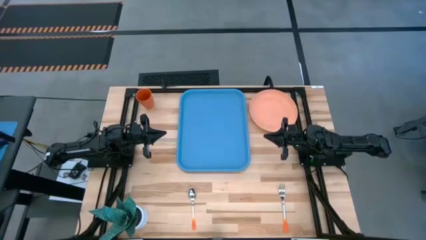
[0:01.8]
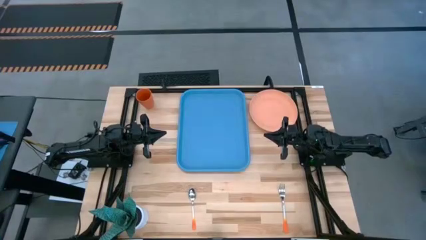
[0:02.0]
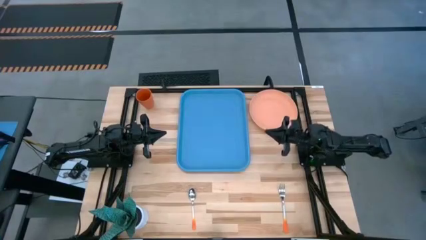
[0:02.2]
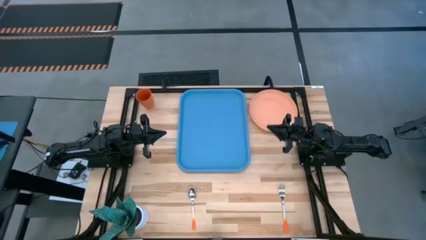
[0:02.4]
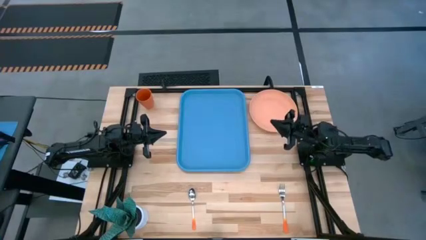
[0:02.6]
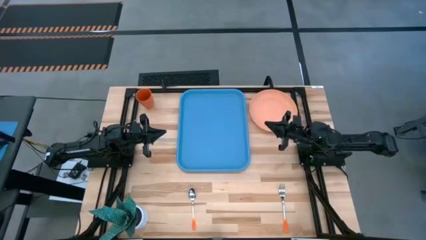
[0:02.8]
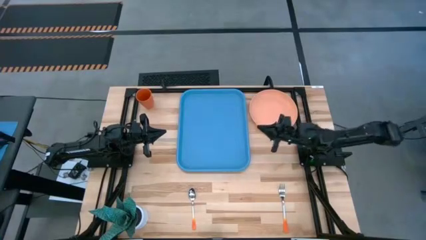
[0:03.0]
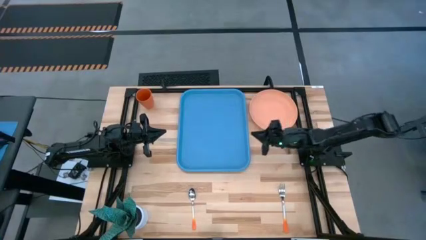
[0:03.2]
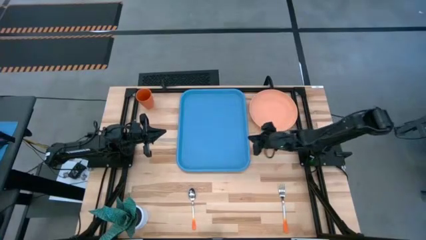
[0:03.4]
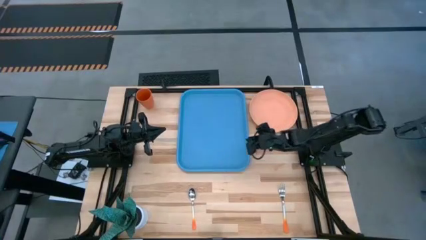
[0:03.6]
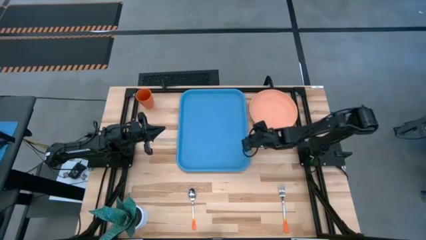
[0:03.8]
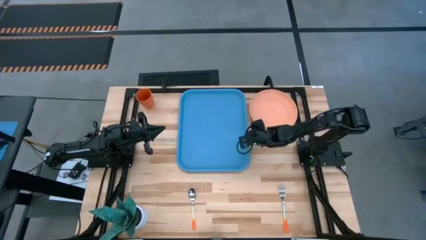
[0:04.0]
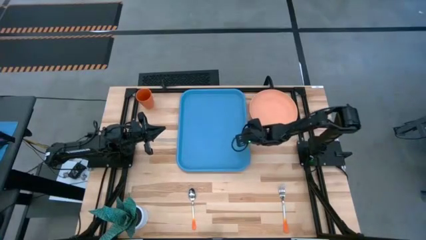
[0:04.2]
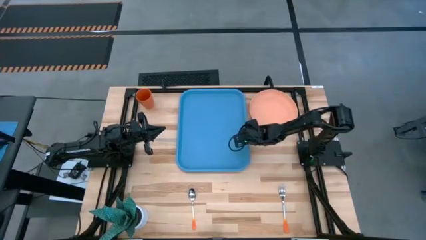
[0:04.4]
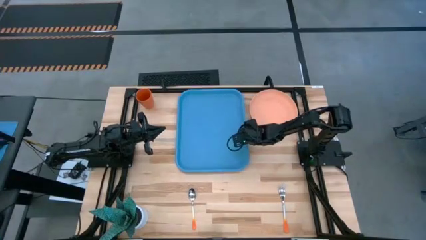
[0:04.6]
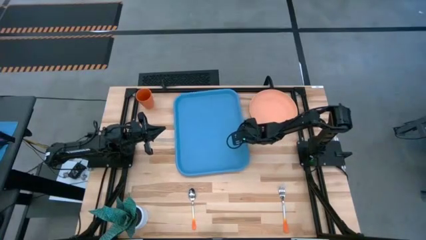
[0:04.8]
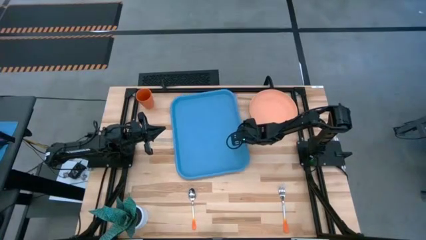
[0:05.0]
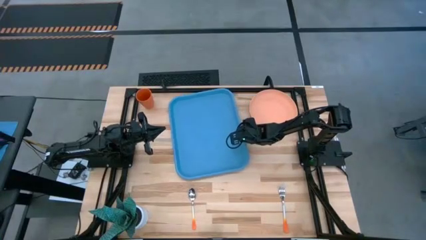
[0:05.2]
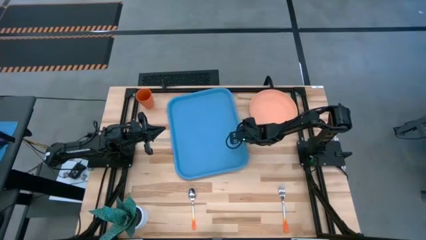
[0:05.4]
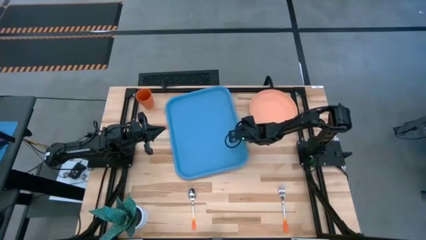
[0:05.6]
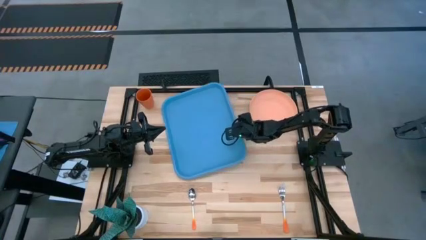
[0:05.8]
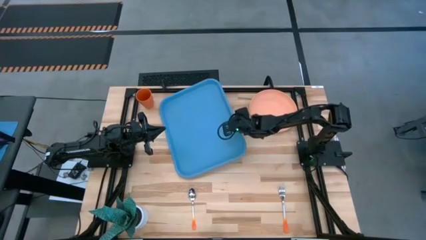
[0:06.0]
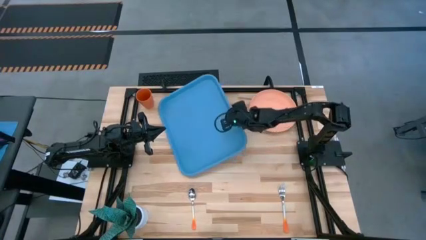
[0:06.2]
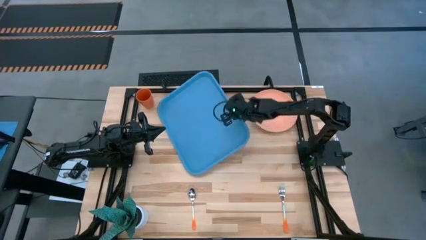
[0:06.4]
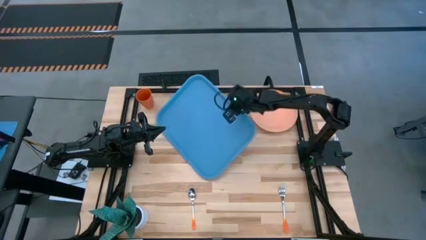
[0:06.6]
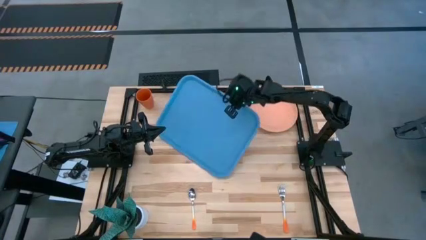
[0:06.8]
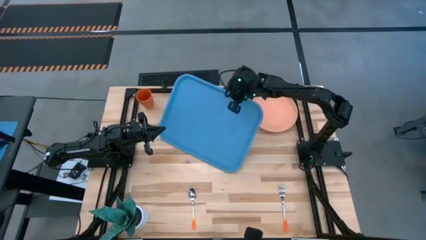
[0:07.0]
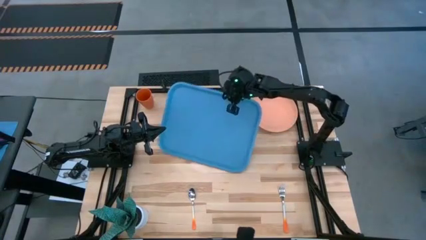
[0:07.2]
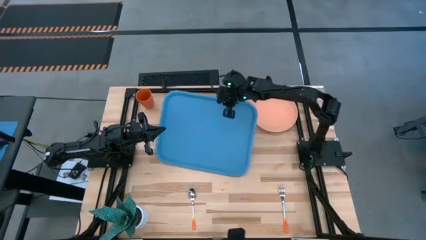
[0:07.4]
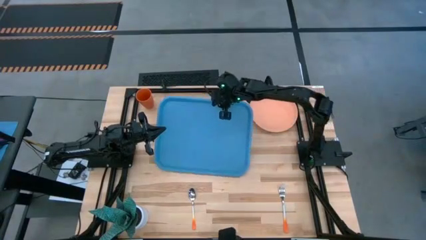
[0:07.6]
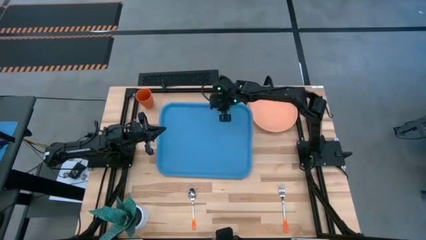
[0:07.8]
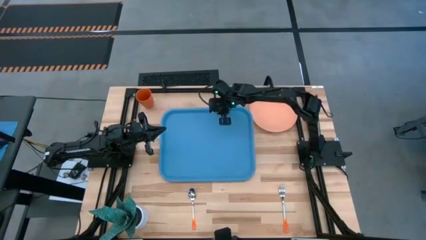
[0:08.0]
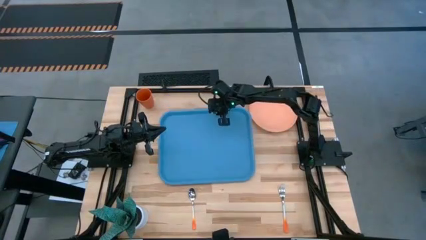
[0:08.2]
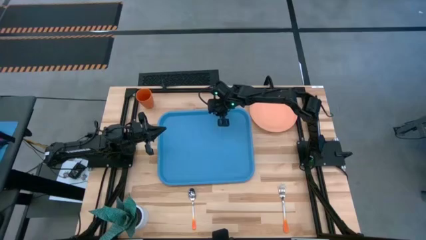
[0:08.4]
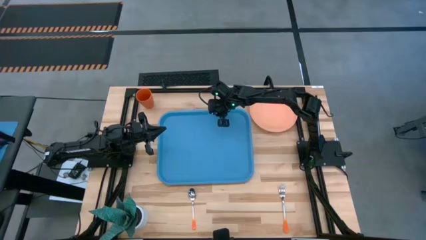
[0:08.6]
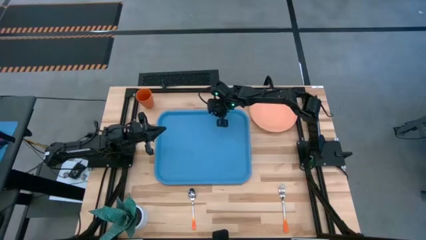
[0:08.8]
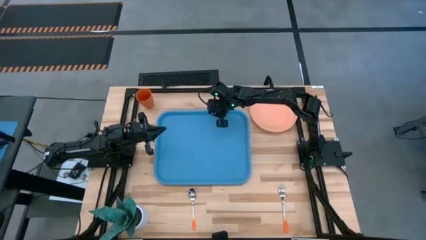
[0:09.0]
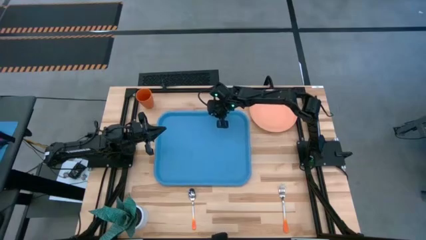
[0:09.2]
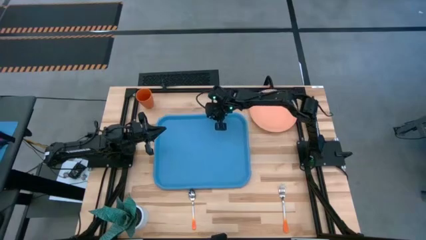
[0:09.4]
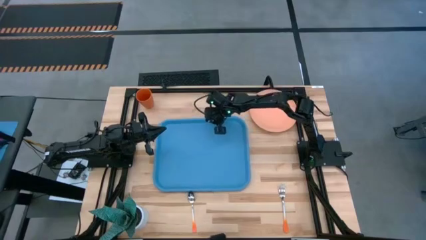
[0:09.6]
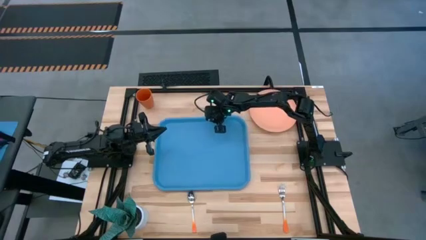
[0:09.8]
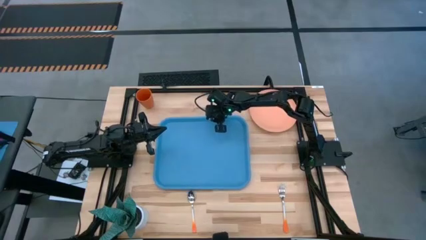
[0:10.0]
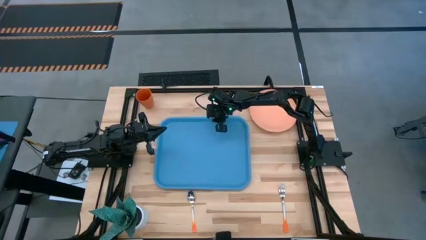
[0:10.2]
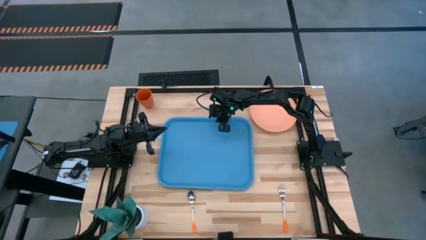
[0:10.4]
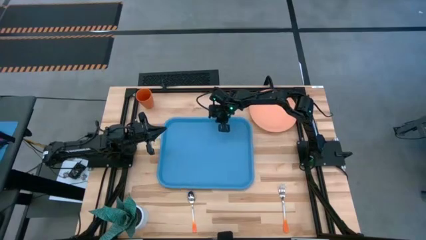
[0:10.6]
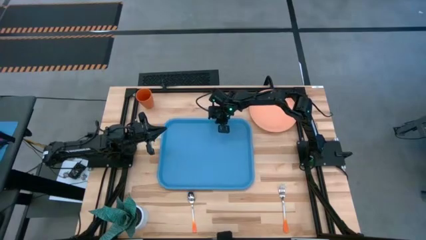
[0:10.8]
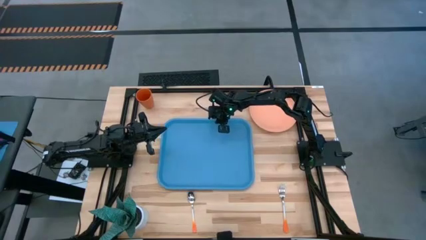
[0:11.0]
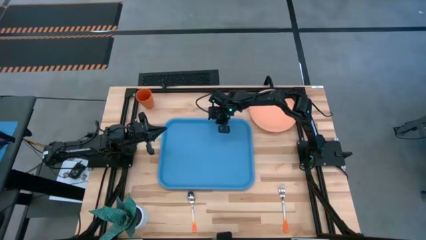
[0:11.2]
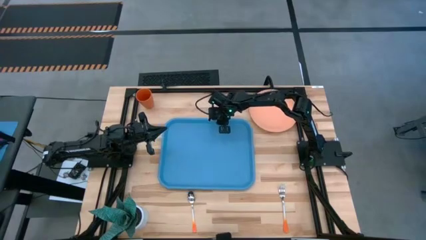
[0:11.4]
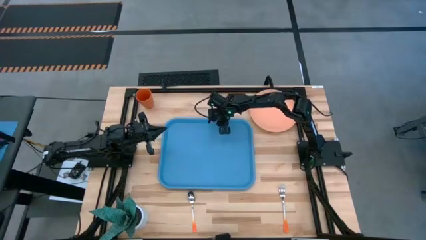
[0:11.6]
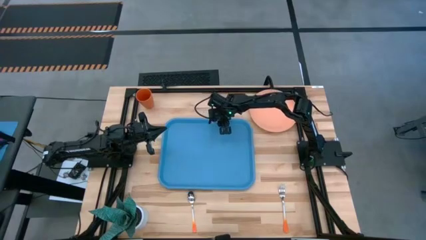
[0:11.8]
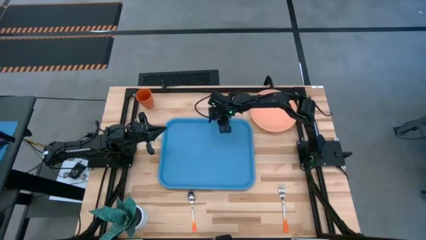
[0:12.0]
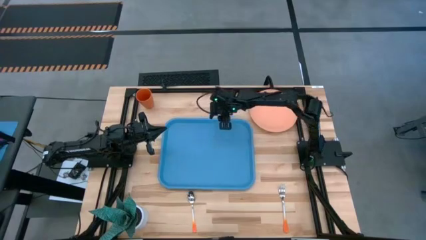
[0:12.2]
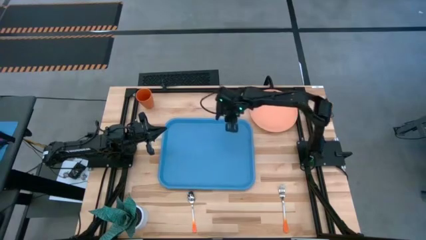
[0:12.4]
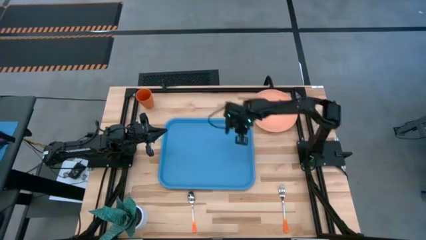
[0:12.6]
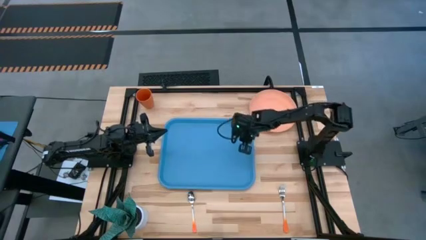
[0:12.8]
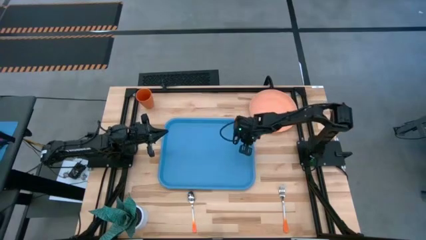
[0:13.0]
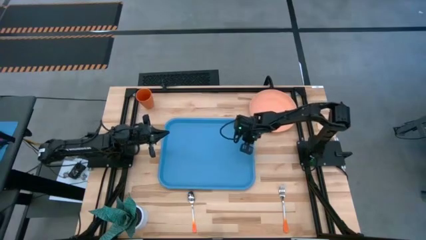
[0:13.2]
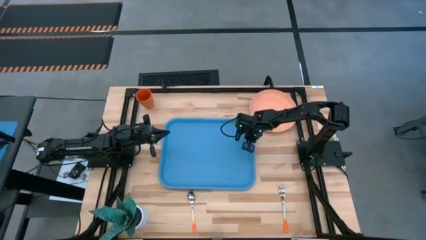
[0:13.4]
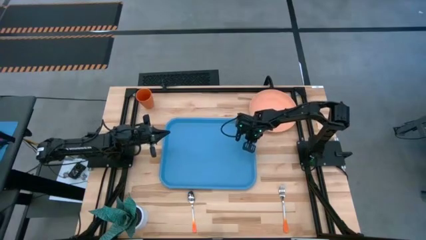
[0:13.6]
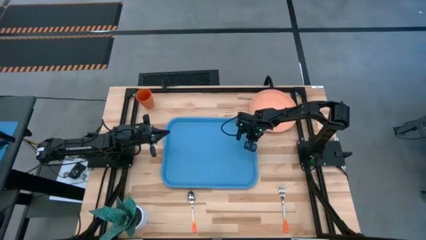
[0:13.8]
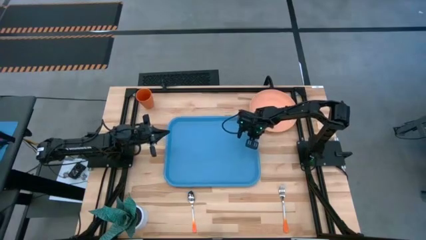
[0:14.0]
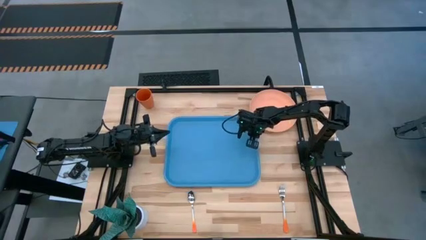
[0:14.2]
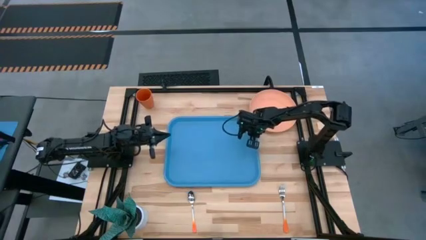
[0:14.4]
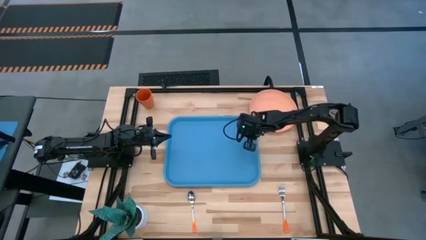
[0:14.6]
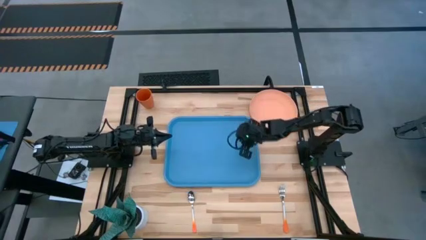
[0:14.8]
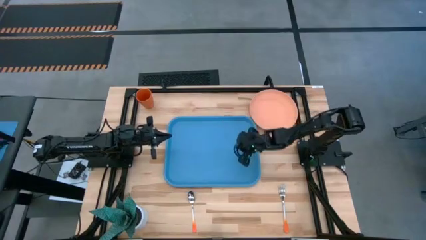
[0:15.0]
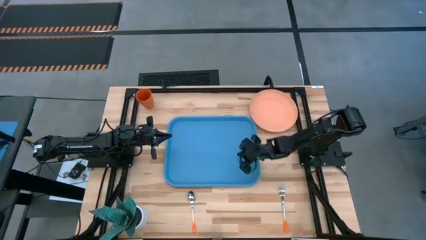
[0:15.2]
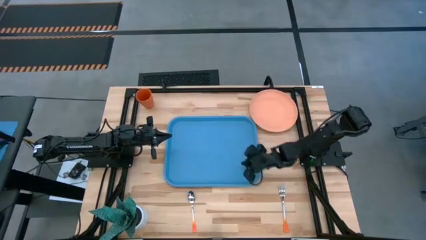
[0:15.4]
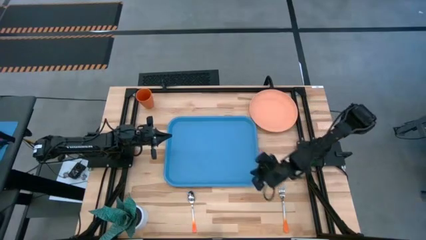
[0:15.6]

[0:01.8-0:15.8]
Task: Pick and place plate/cup/fork/spoon on tray
Prepare the blue serving tray

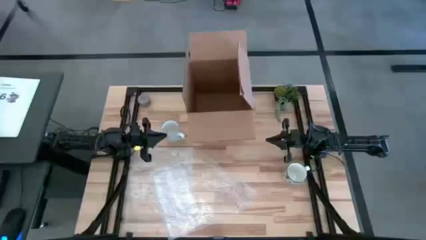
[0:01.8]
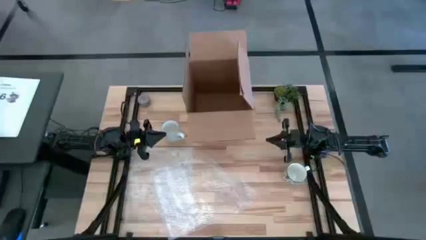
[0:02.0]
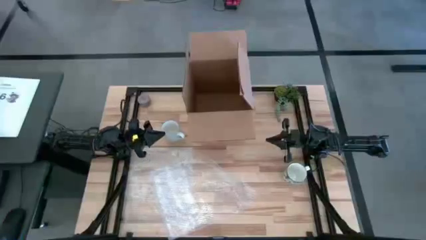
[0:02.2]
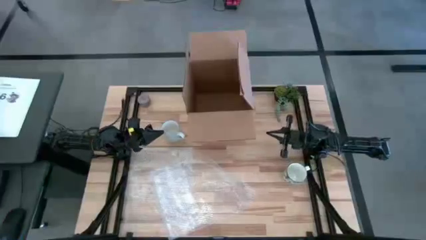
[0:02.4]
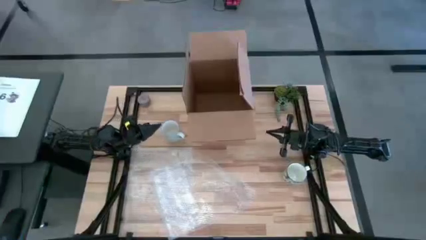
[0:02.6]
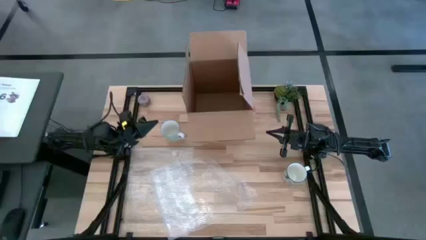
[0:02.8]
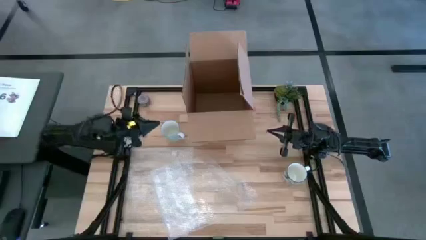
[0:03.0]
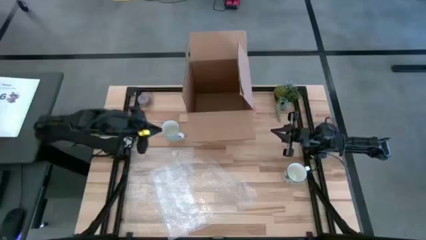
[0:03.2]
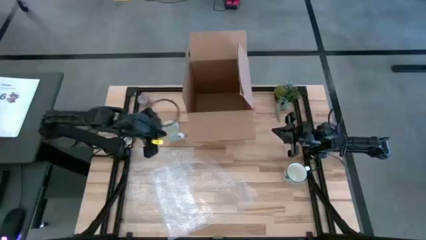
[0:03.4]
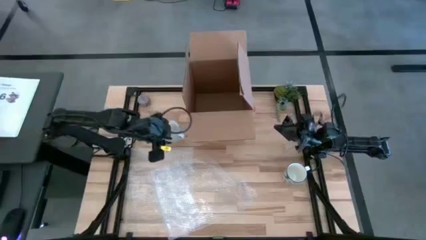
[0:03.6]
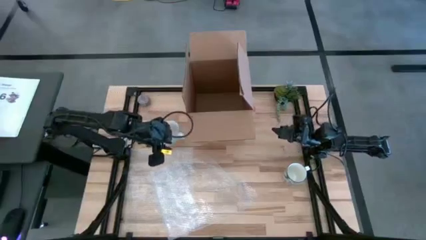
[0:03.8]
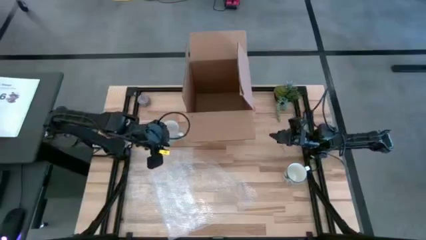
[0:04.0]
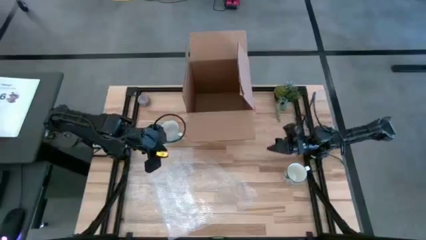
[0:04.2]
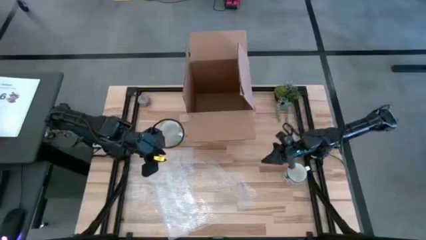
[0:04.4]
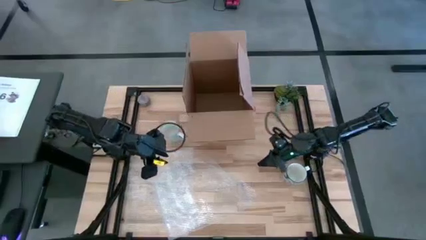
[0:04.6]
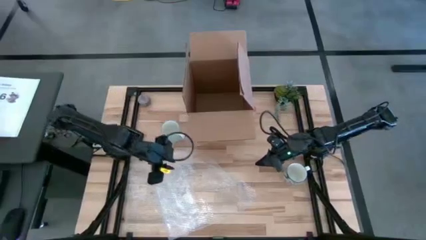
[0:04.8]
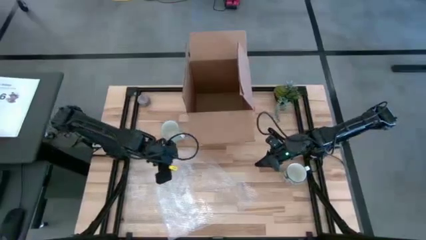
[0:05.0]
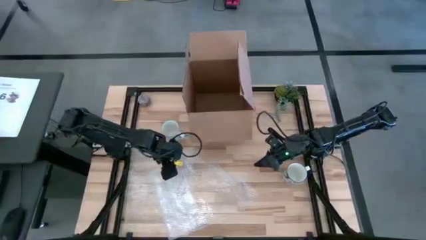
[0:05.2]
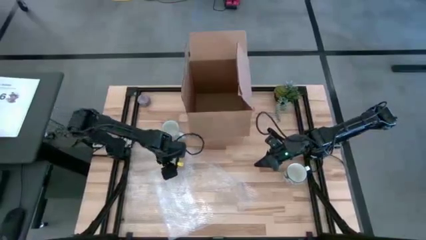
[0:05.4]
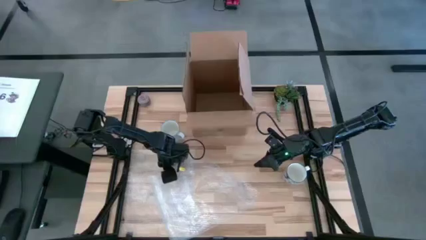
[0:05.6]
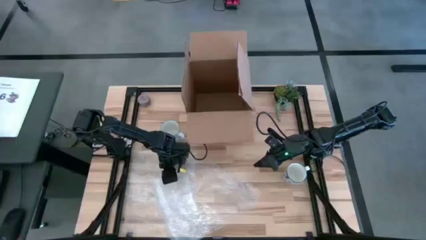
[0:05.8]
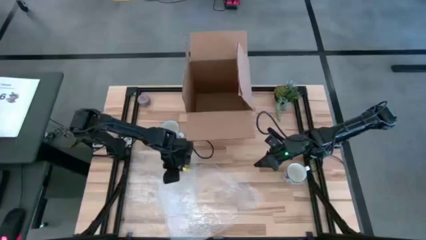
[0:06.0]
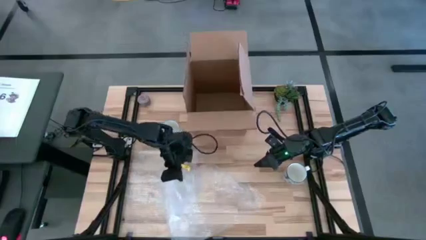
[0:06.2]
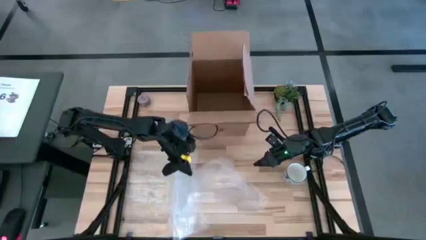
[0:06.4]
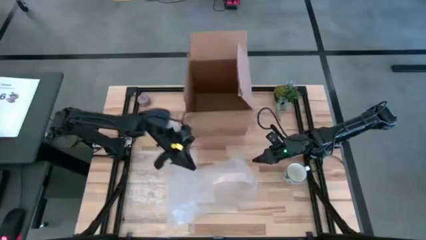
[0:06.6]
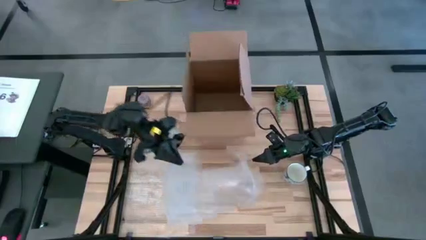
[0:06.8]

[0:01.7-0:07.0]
Task: wrap mug
Prepare the right transparent bubble wrap
